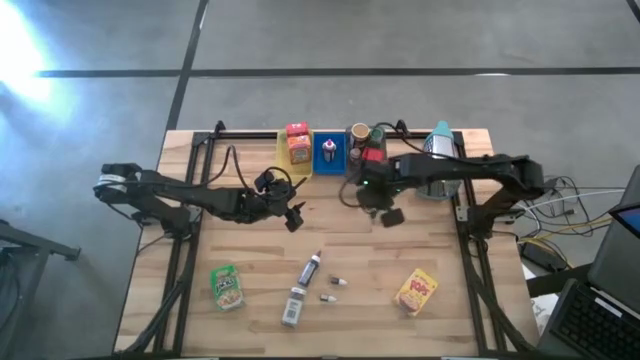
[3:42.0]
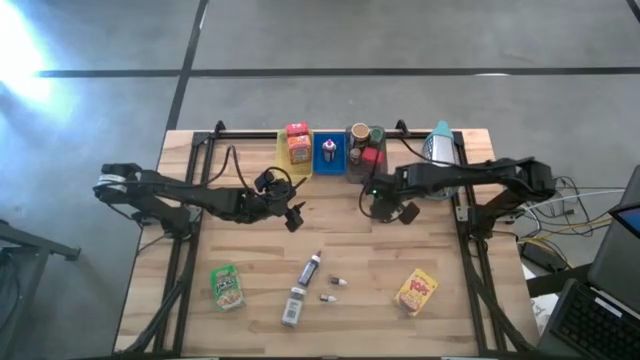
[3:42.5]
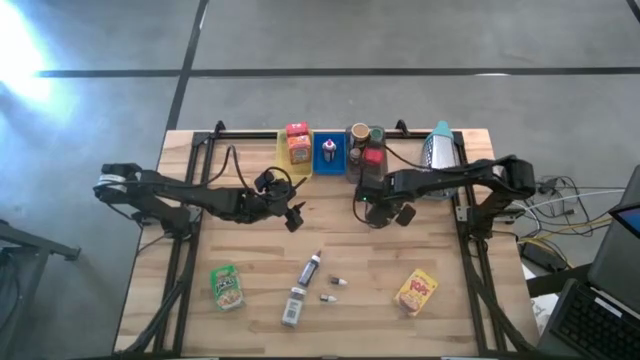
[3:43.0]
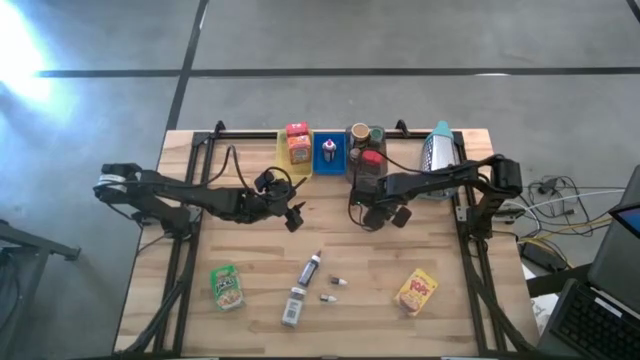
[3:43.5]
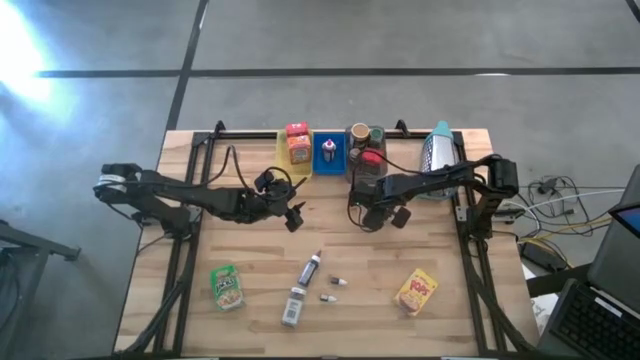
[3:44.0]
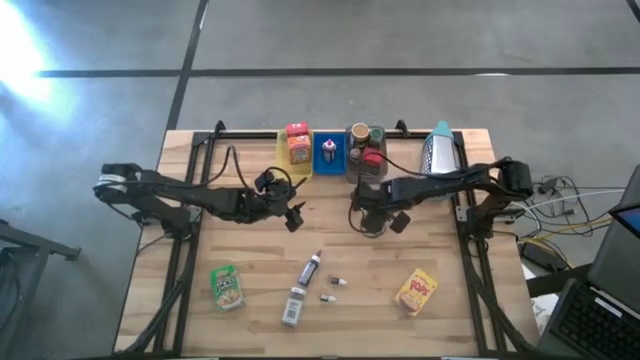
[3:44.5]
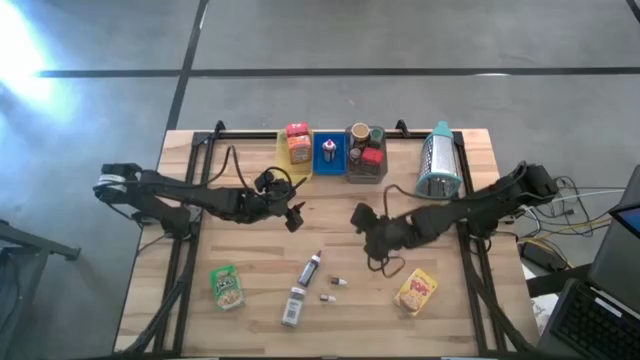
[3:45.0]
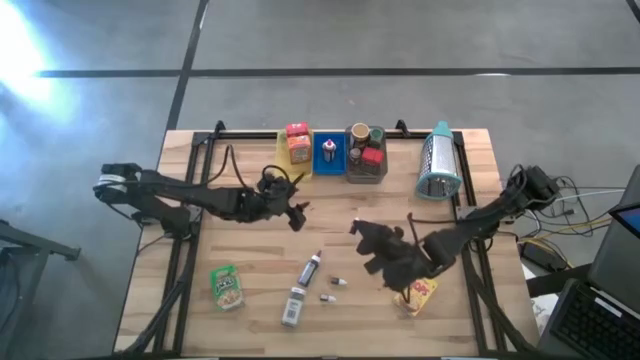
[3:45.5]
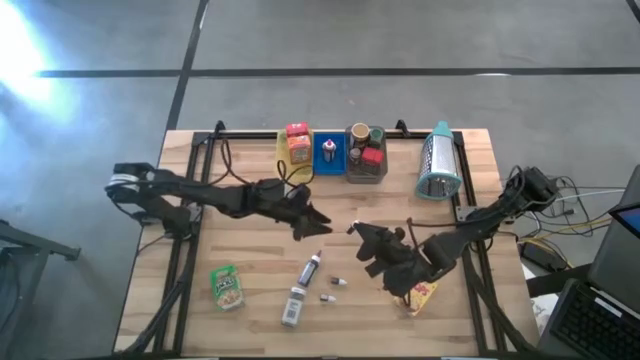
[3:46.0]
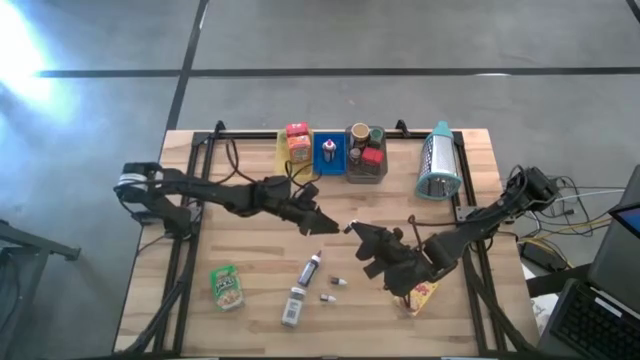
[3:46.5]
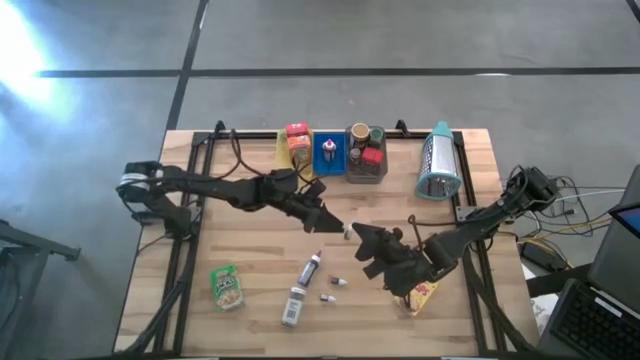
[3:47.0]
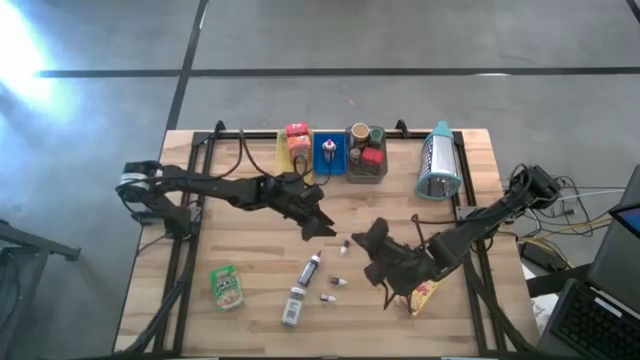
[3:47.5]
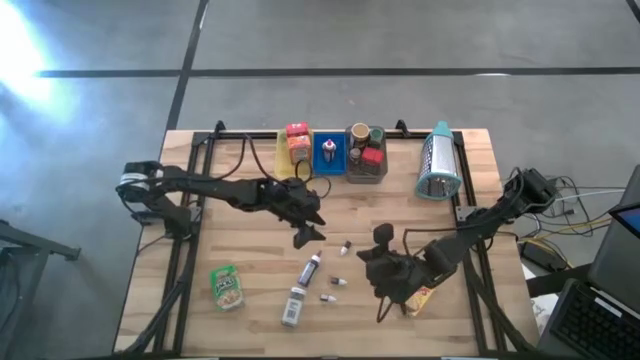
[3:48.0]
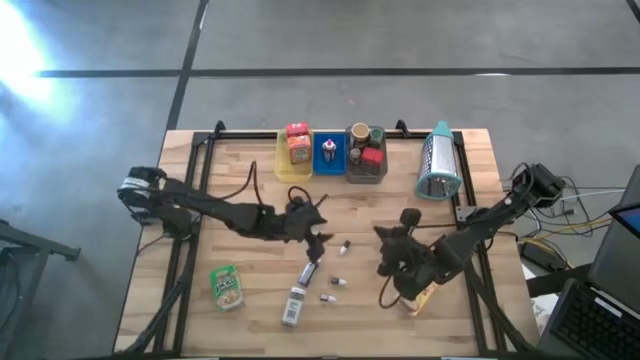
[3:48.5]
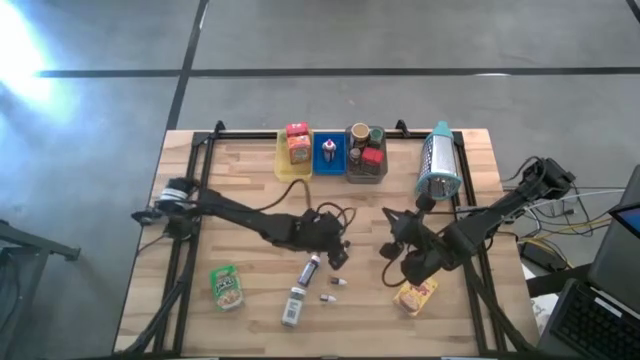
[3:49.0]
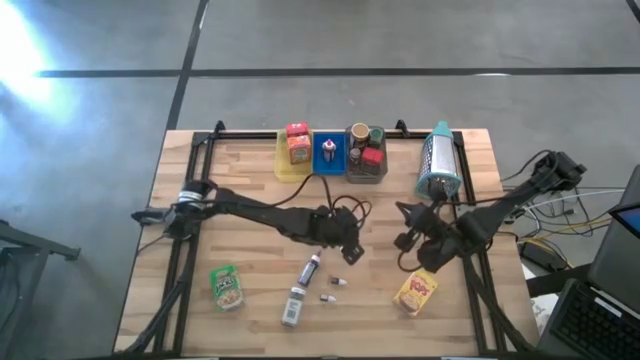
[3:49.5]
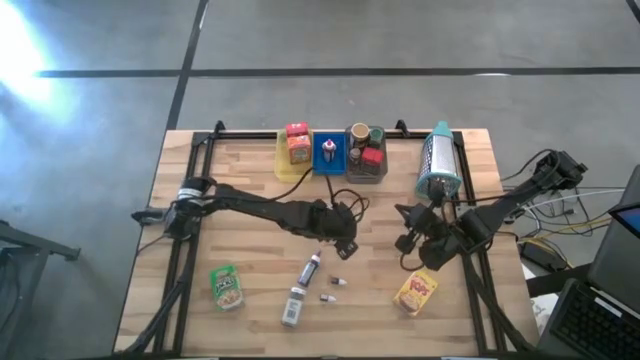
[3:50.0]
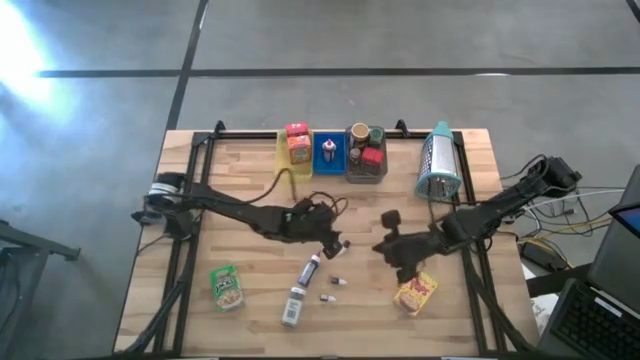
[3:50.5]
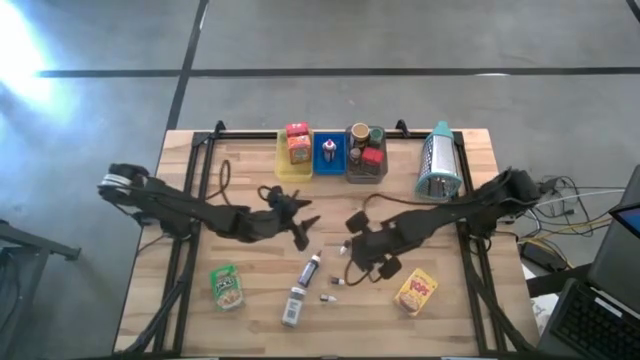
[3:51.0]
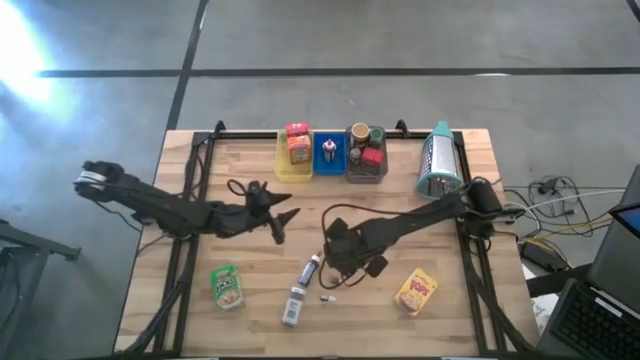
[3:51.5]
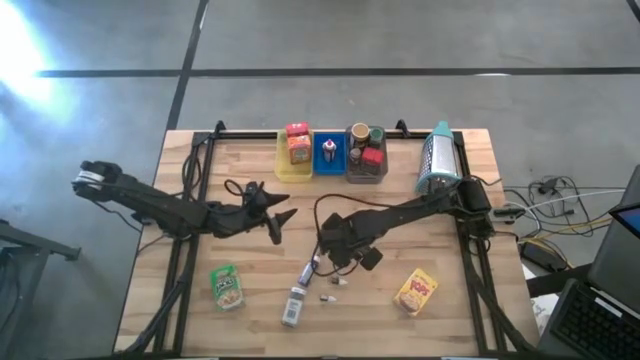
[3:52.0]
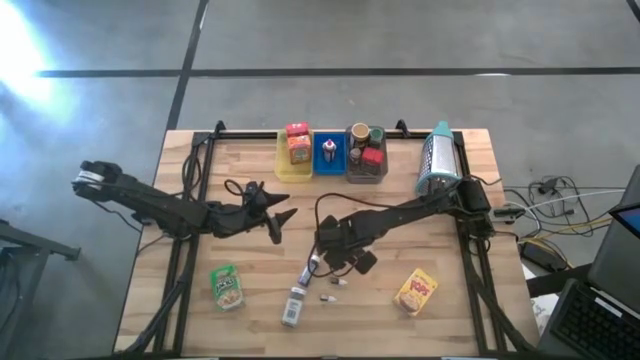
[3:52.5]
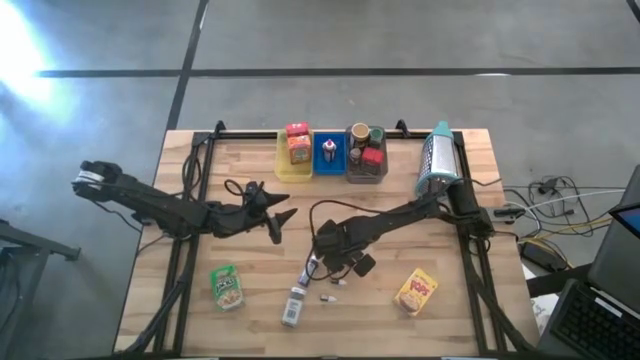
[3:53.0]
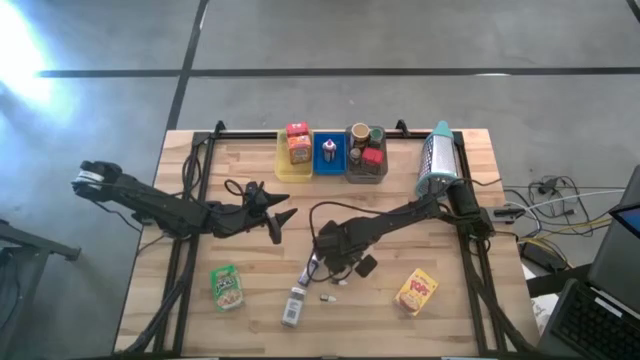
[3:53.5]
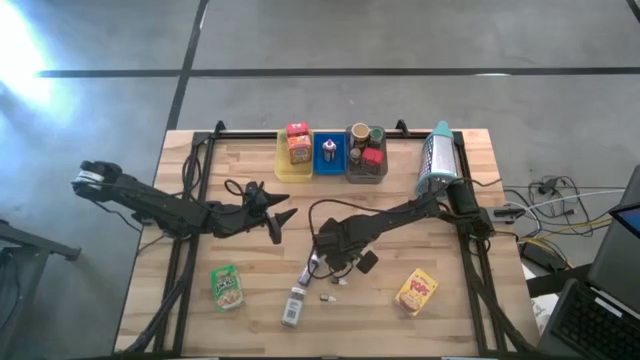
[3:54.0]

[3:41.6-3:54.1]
Task: Pick & Place Kitchen Items
Put the small blue food coloring bottle into the blue bin

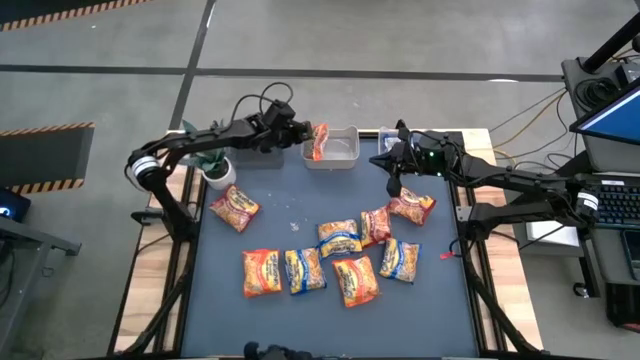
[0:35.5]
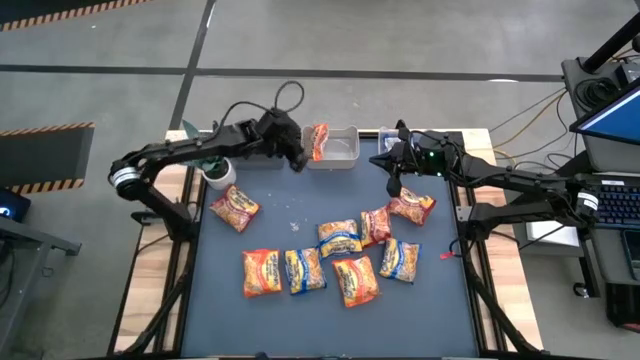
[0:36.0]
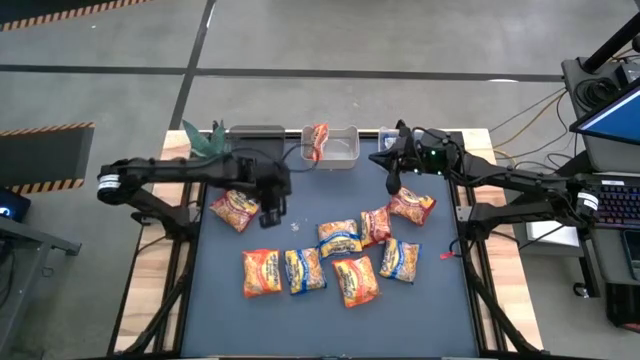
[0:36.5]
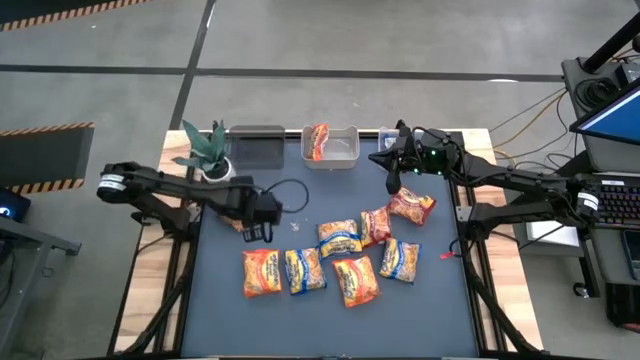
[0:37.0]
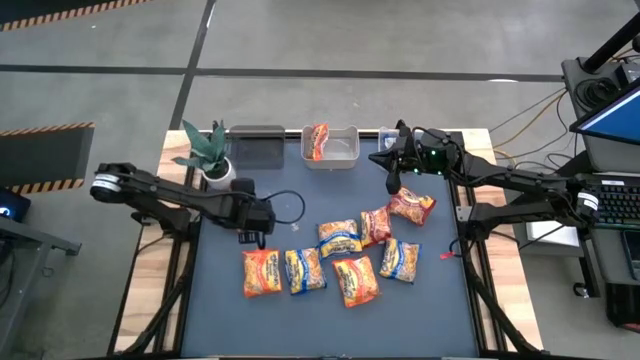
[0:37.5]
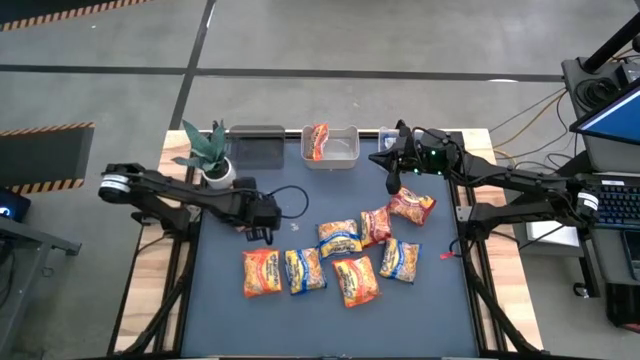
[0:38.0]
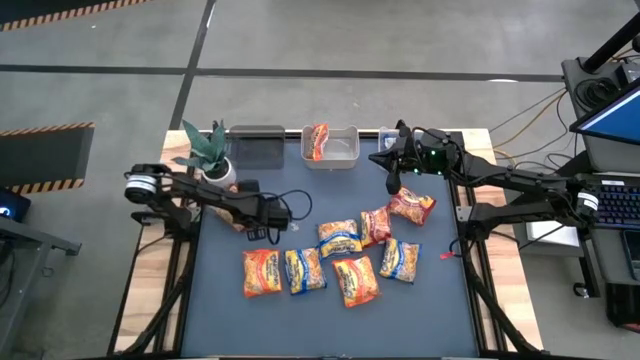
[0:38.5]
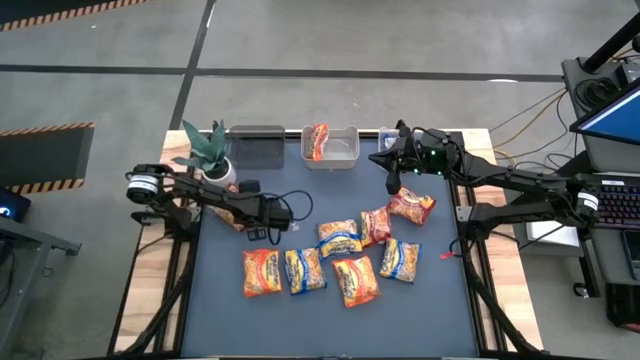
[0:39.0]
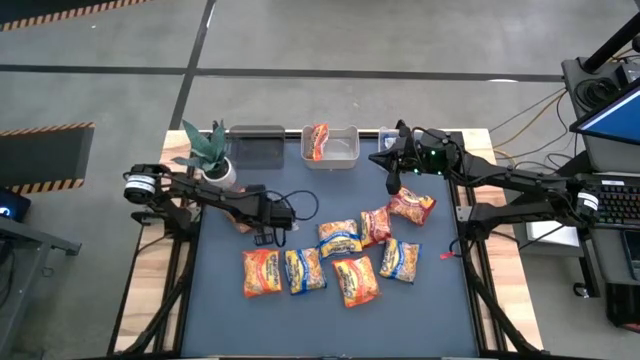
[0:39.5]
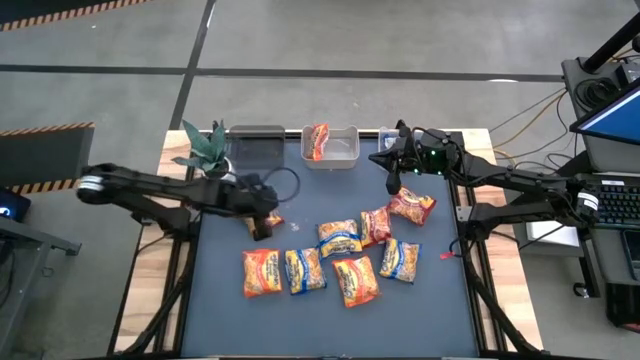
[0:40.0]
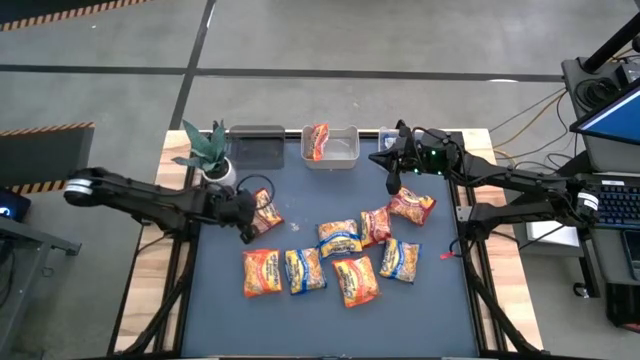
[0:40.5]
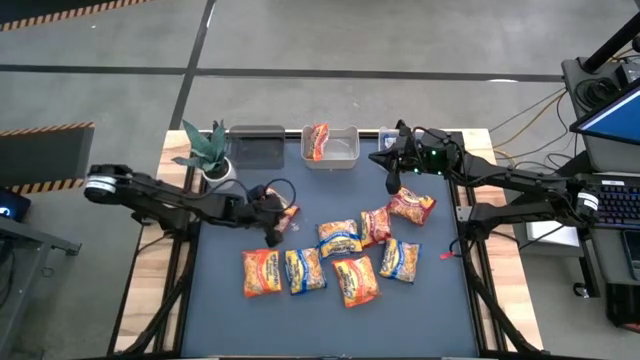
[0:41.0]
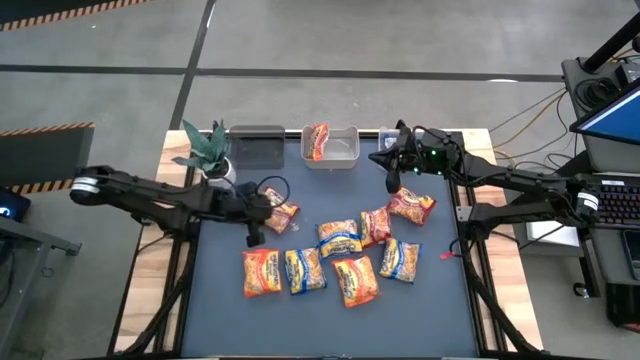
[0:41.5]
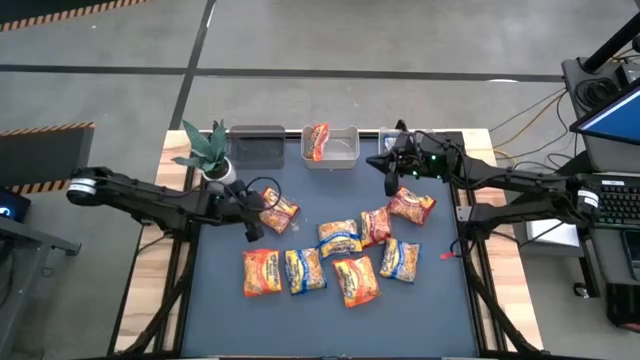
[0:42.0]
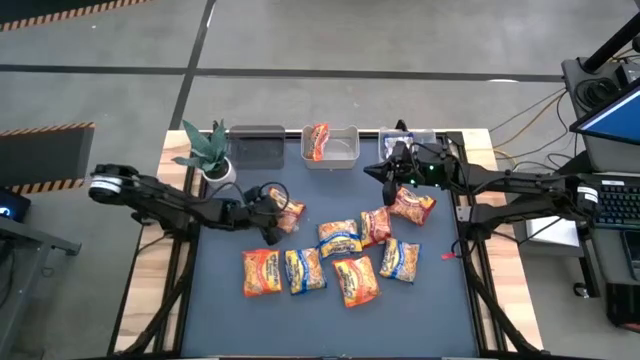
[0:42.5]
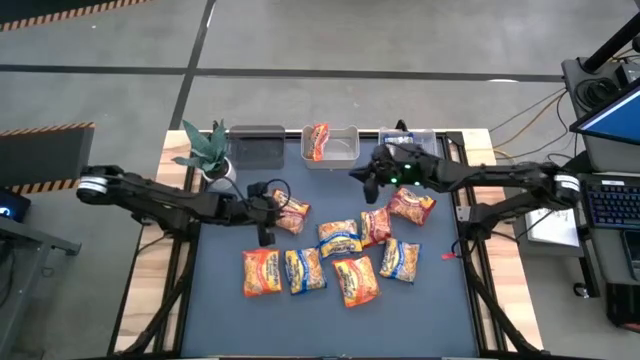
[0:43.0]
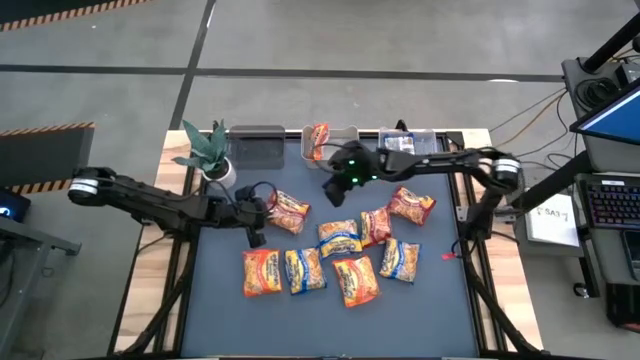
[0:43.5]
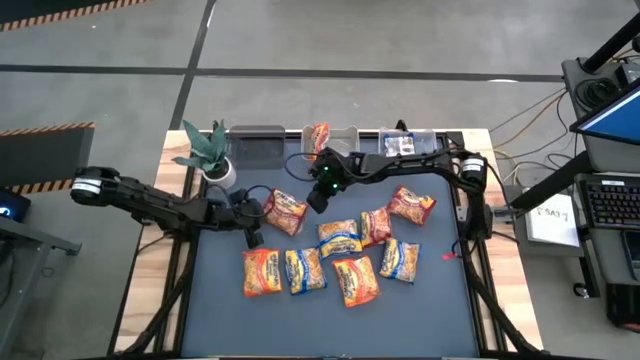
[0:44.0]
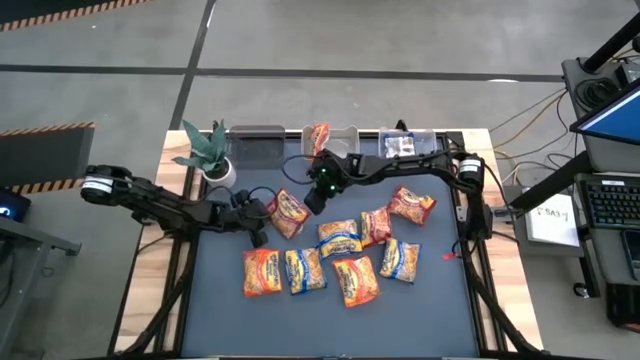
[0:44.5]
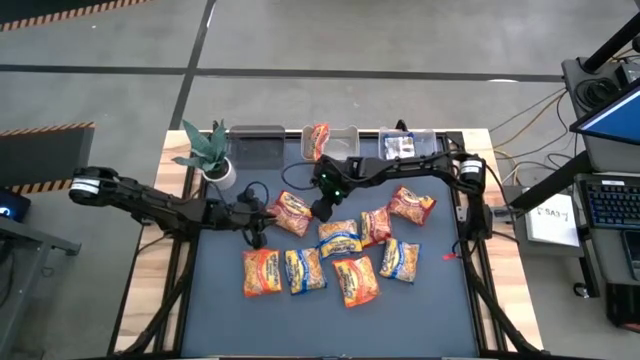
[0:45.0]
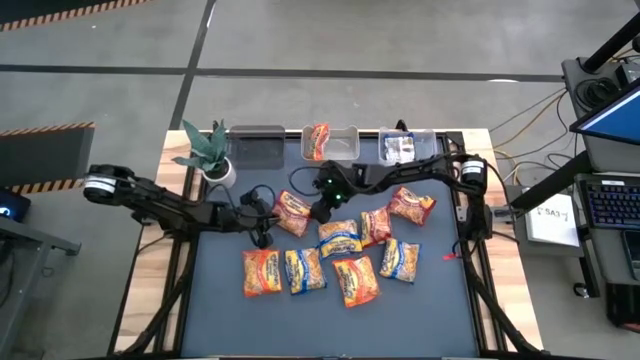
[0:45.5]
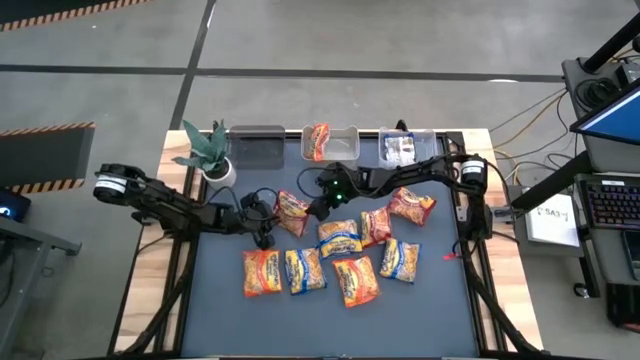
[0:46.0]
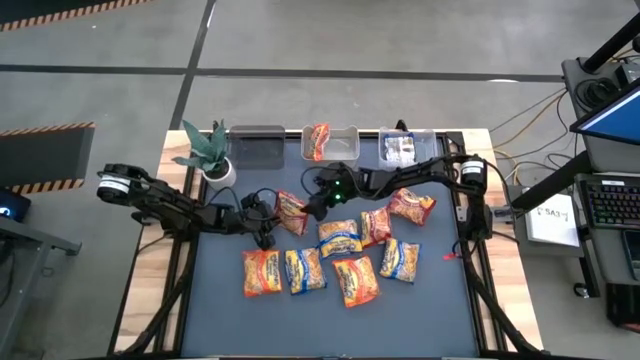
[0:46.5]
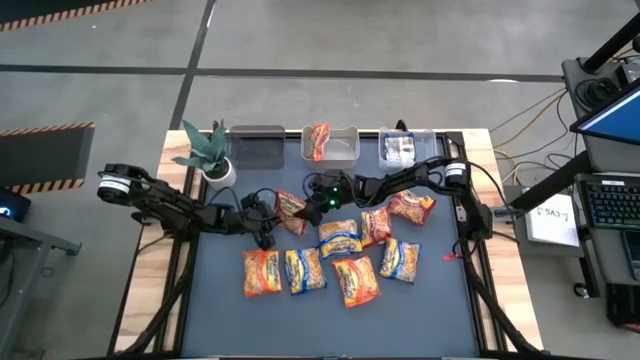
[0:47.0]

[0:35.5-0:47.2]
Task: Sort Maruchan noodles
Put the left red noodle pack into the transparent black bin
